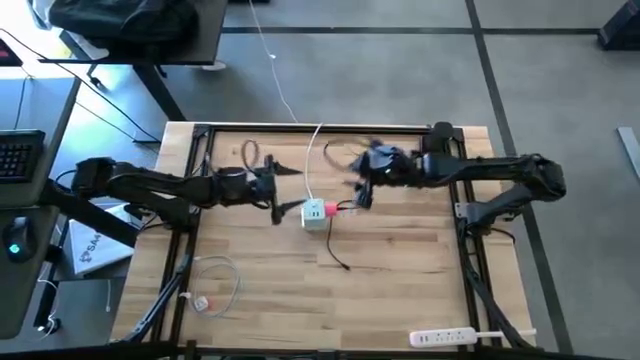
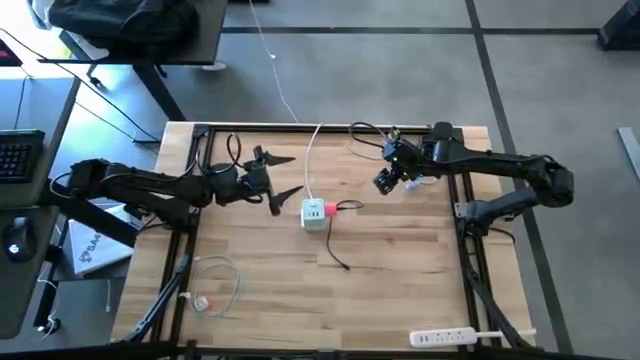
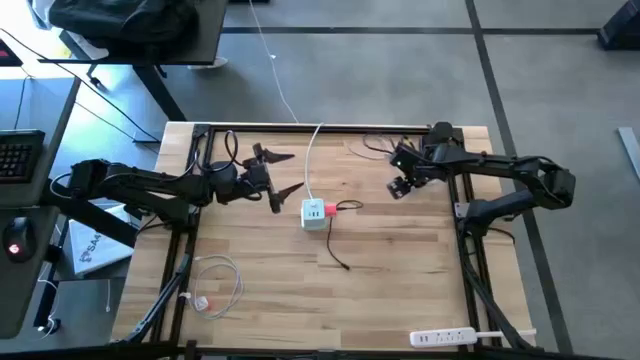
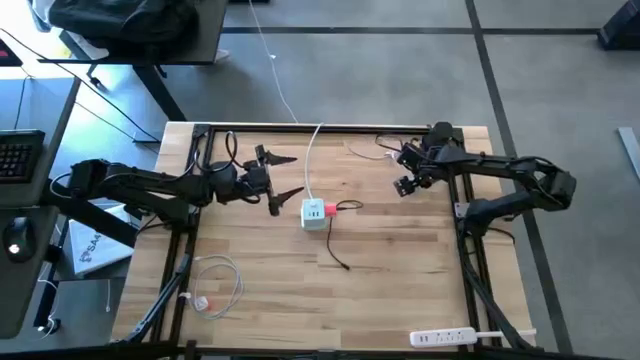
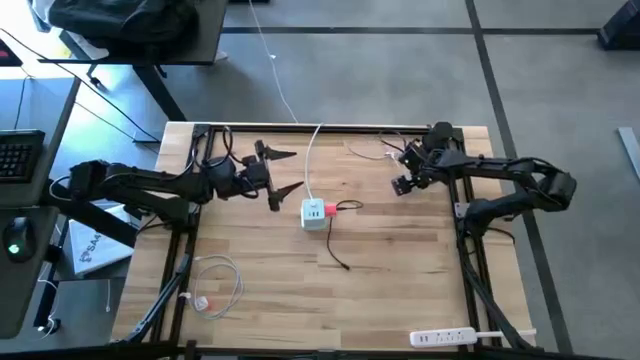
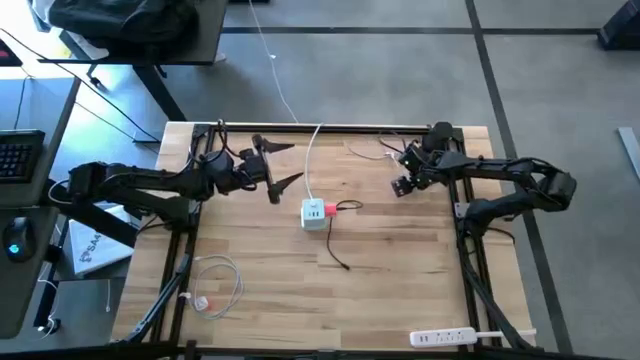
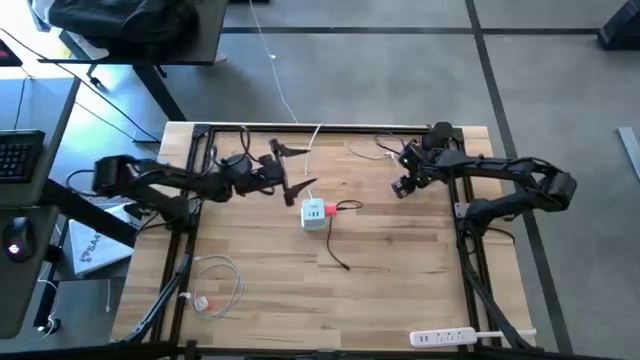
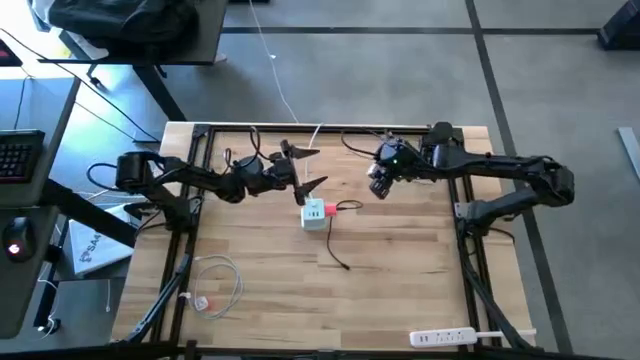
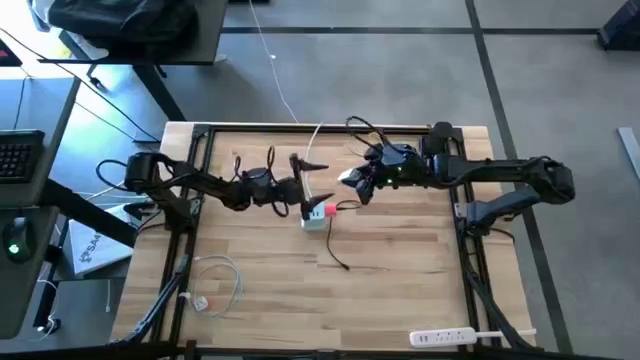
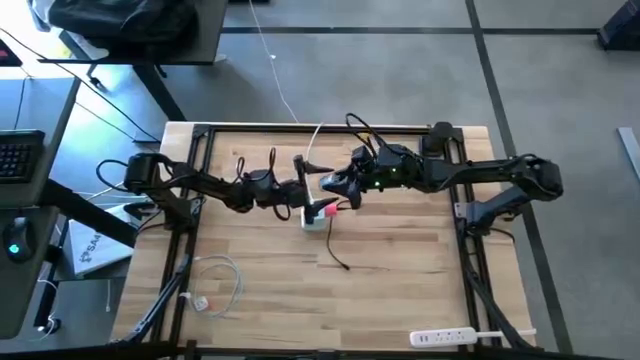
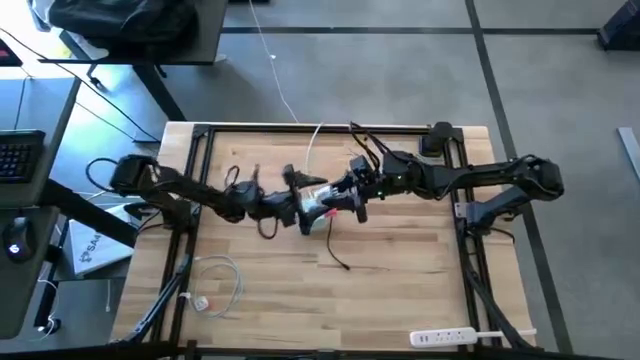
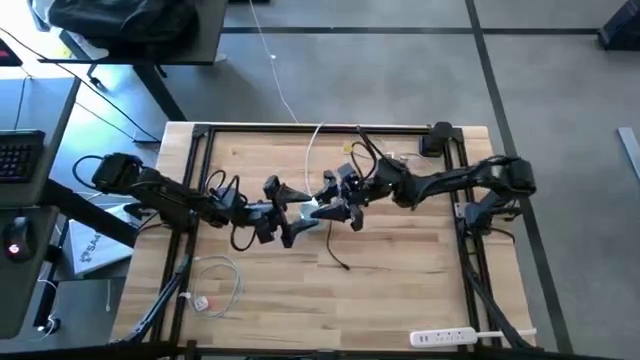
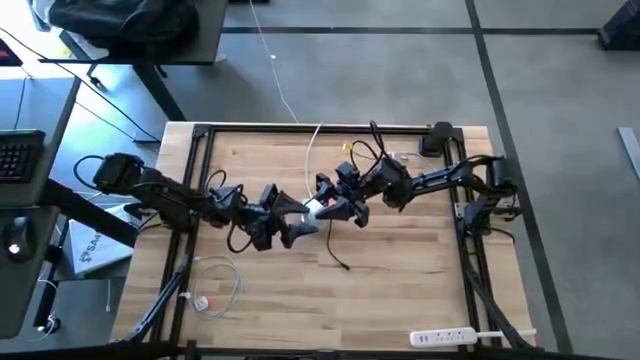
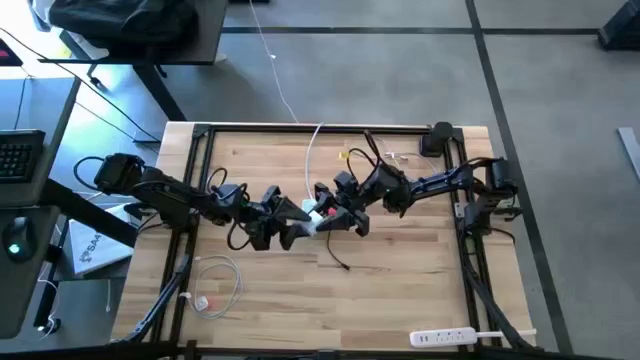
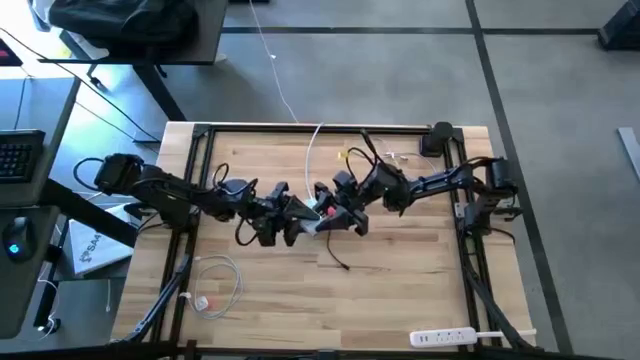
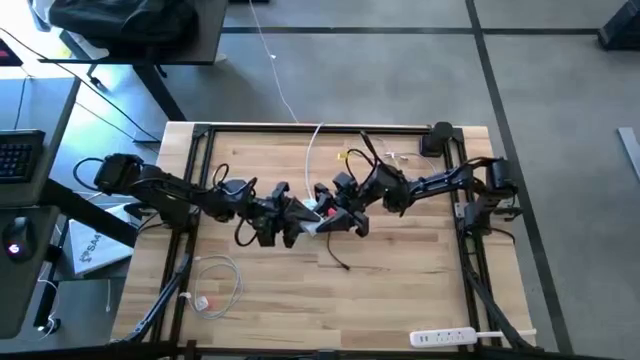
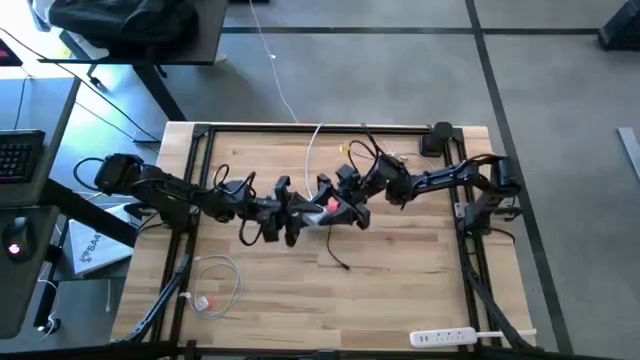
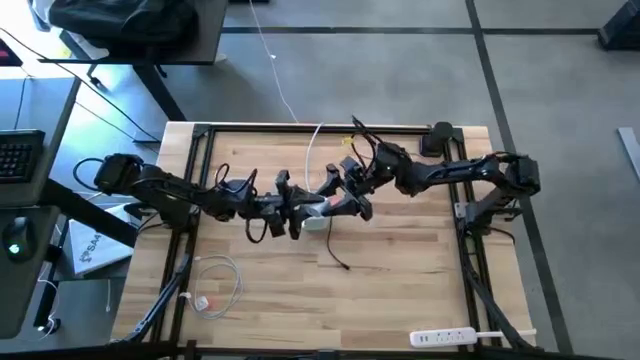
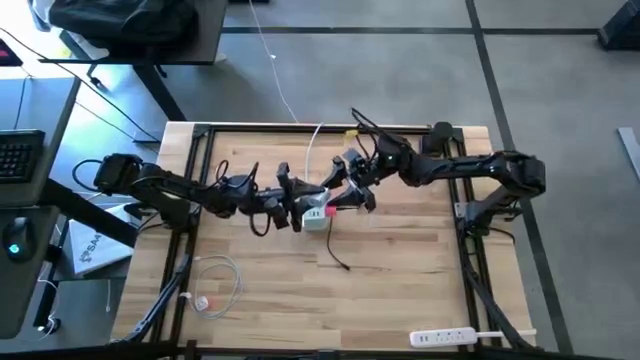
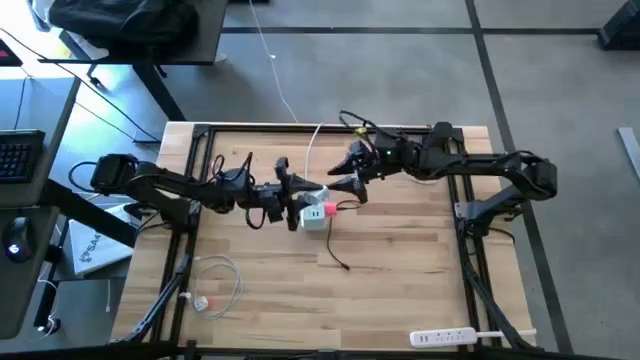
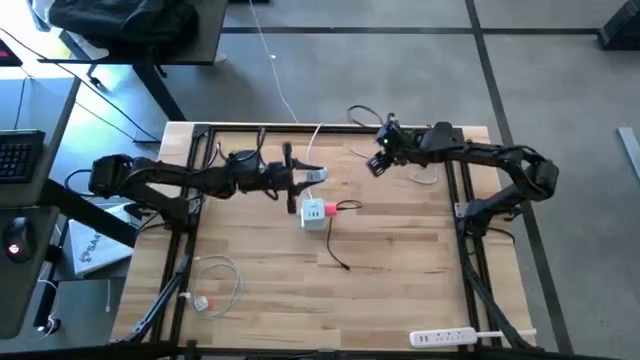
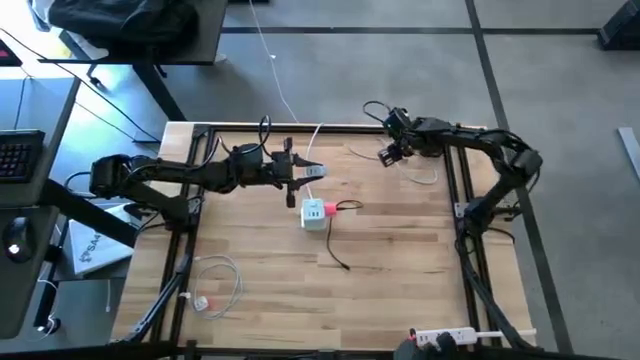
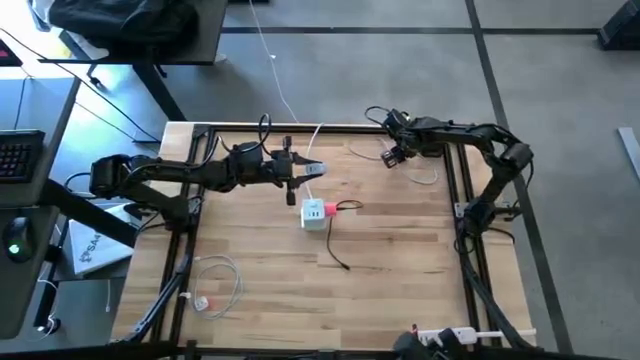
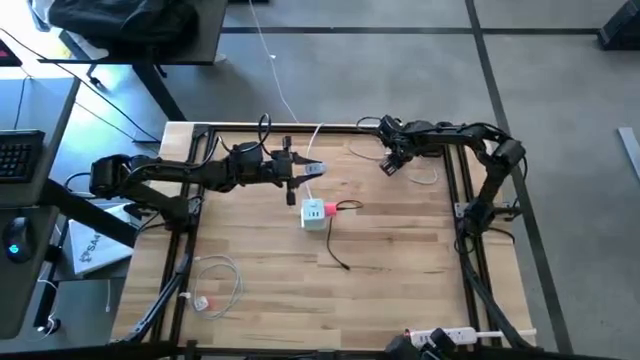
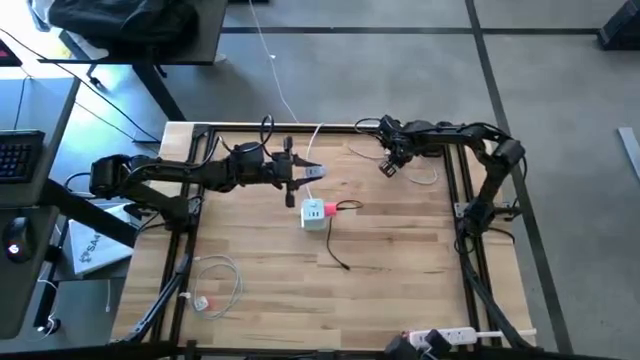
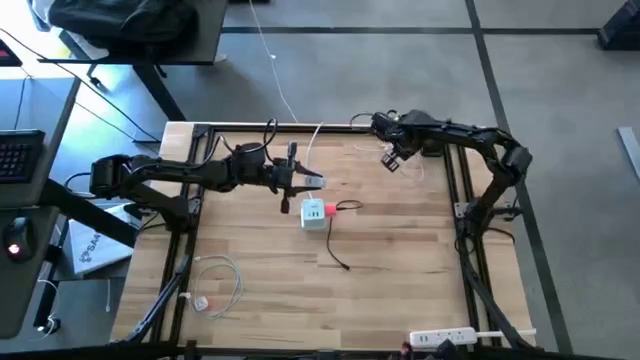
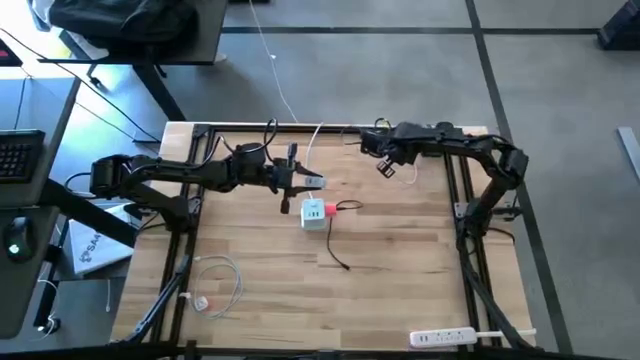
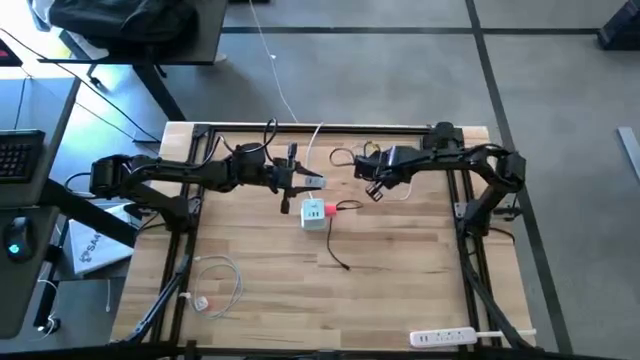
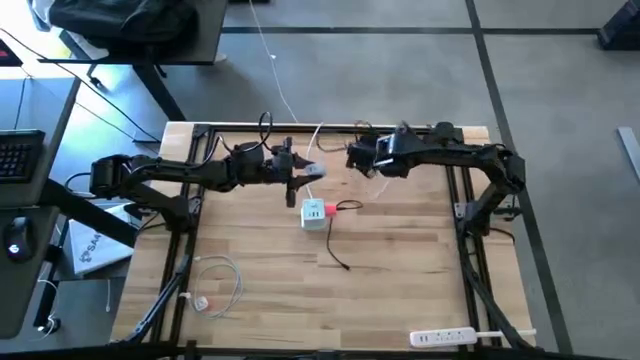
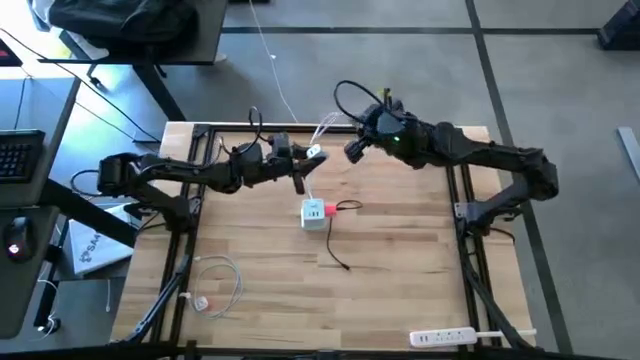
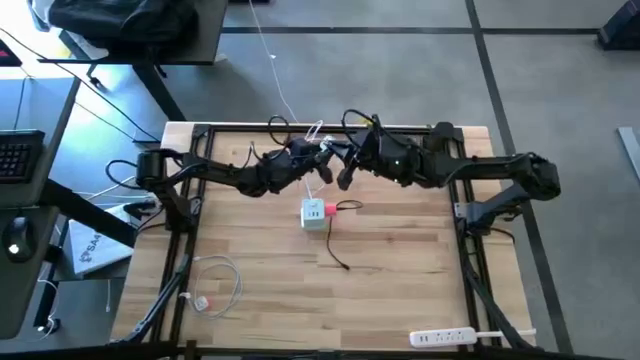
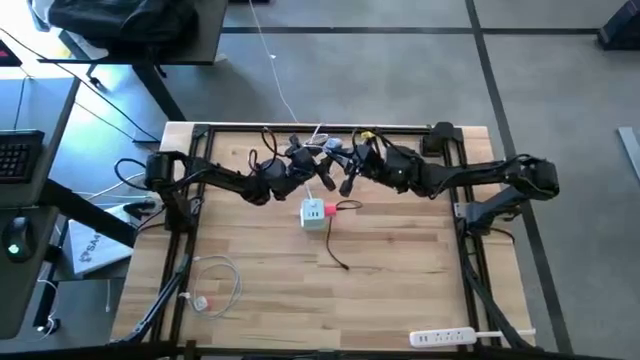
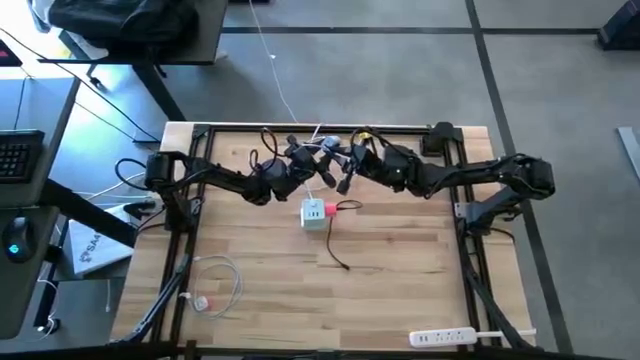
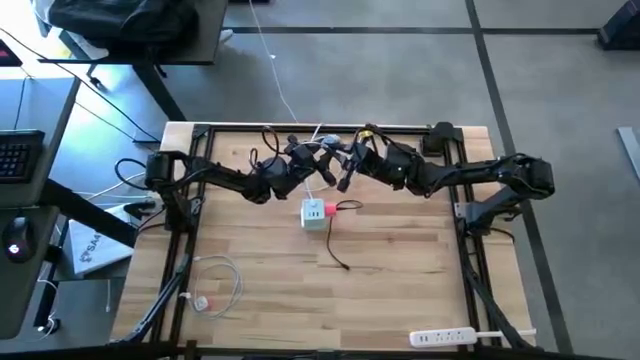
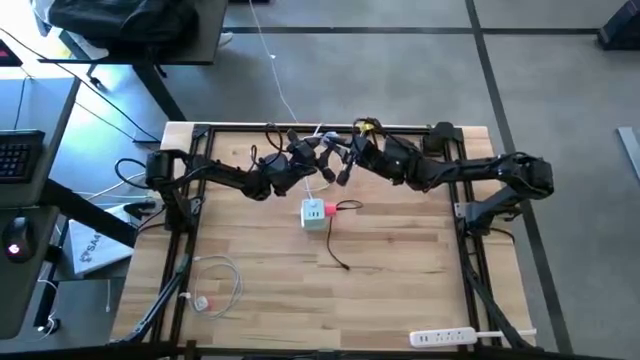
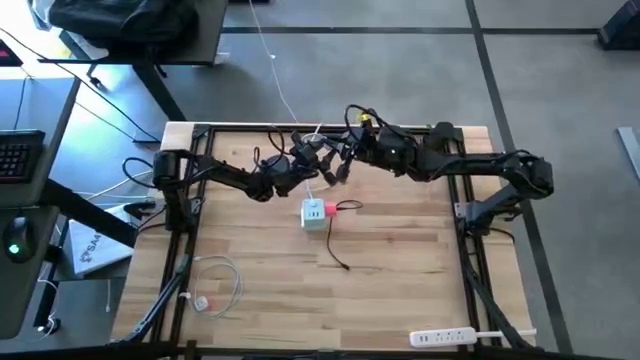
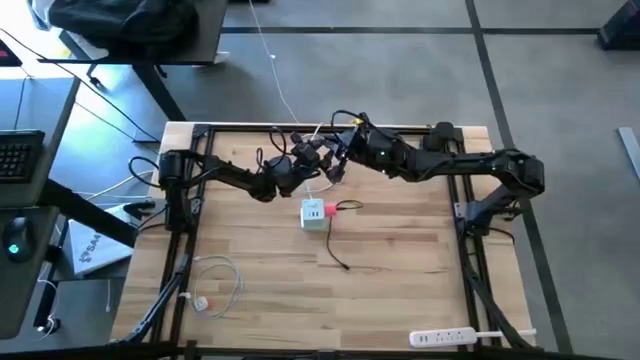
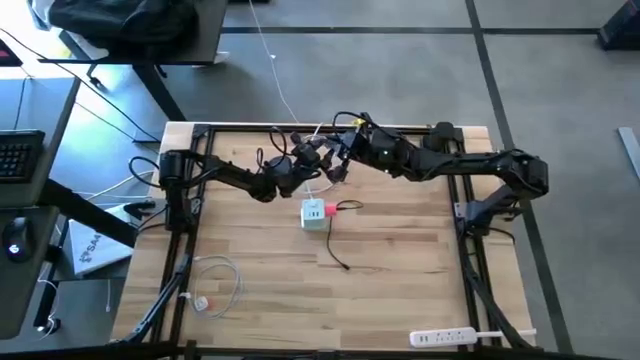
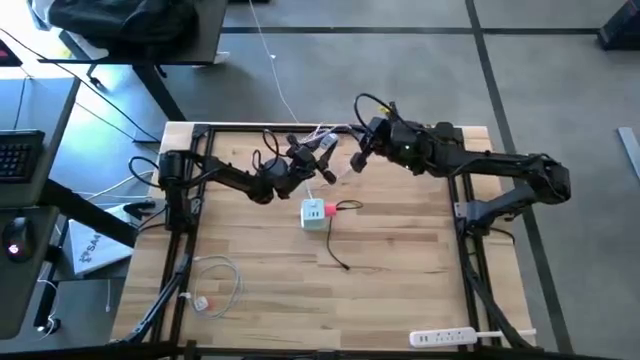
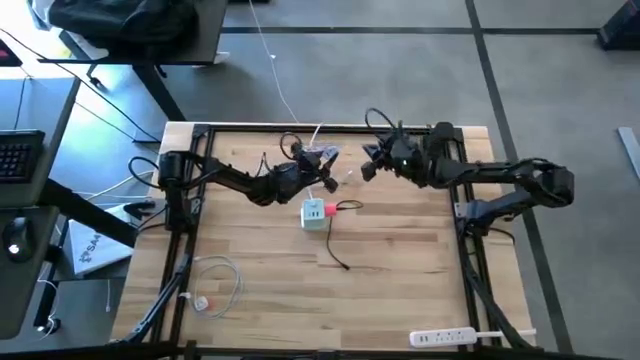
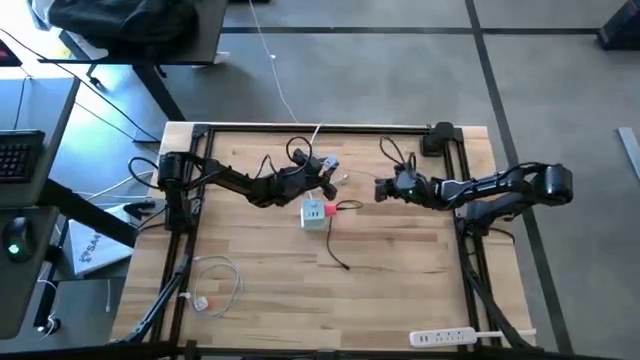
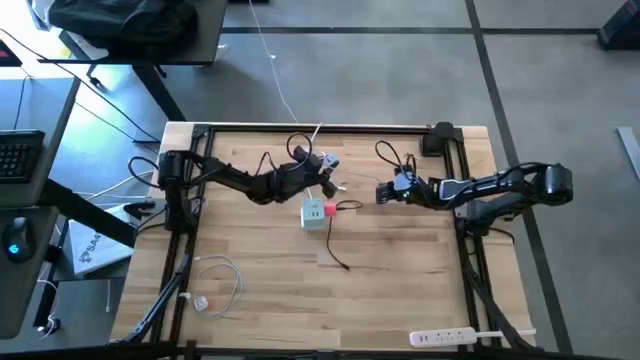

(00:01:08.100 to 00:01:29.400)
Task: Insert USB
Insert the light pink charger cable into the white charger adapter
